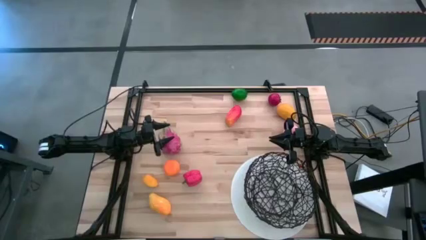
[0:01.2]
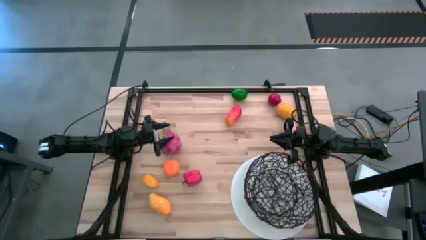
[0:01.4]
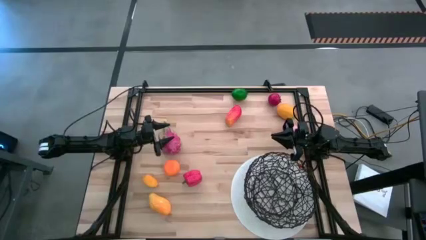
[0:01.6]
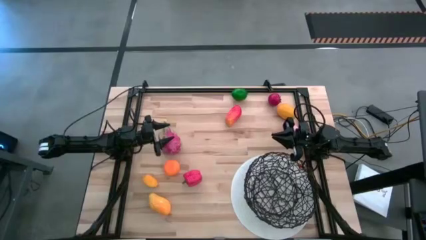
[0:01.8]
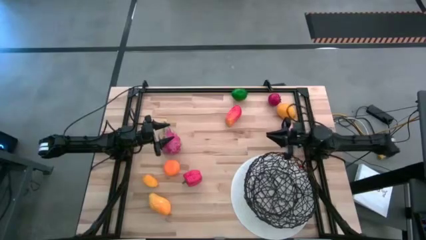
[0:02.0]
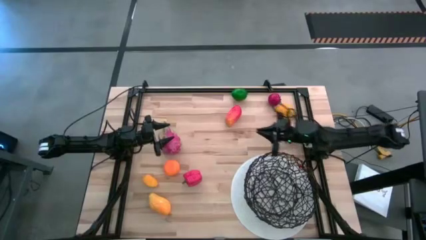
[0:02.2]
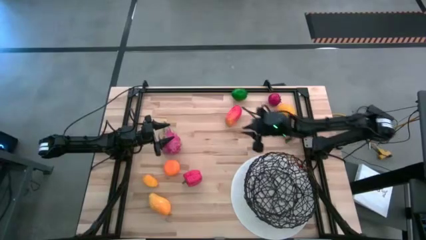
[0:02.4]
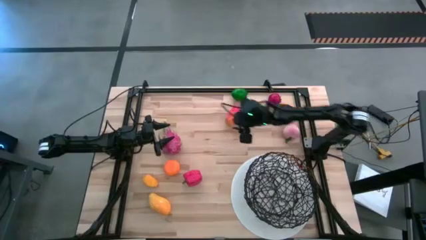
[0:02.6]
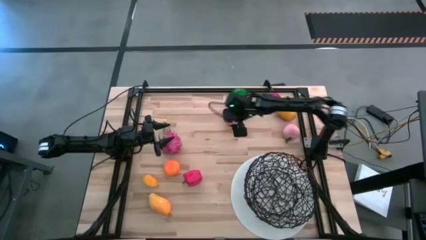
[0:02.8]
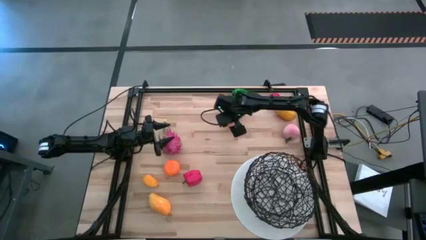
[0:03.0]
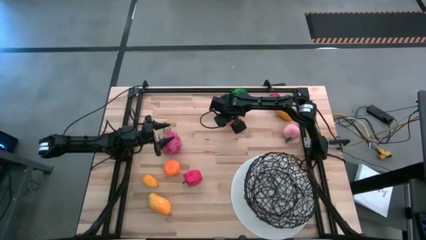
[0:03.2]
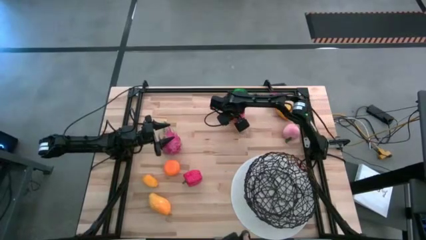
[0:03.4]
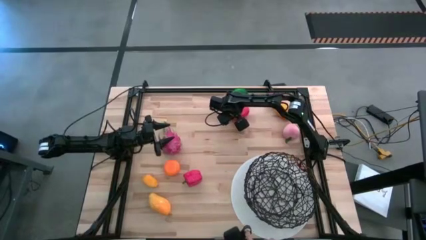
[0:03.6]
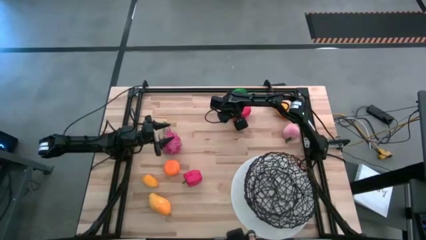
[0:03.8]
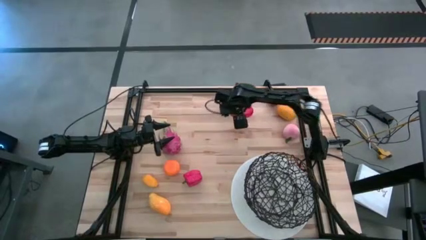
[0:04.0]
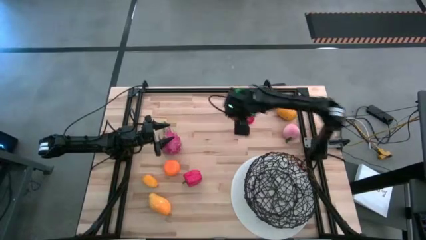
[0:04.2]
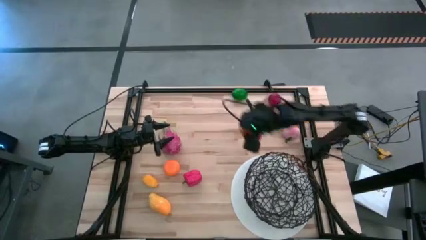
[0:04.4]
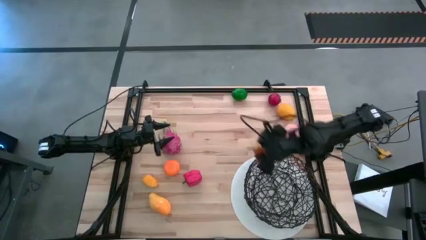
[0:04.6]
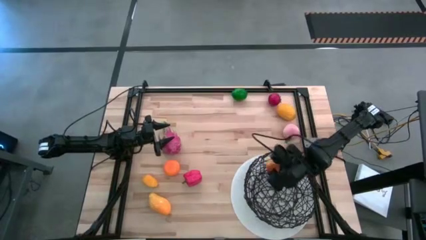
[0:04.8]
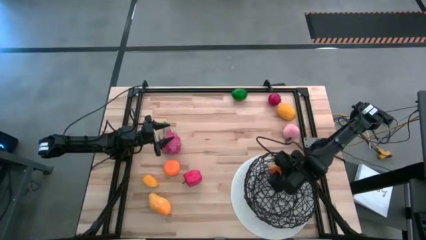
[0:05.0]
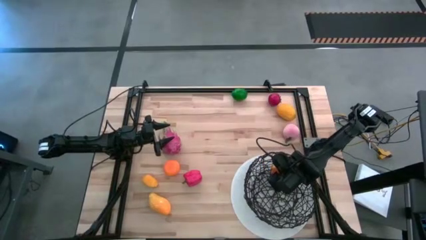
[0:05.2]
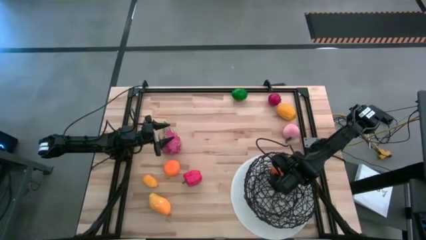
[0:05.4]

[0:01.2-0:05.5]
Task: Build produce basket
Put the red mango into the black wire basket

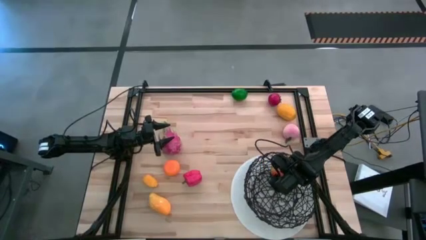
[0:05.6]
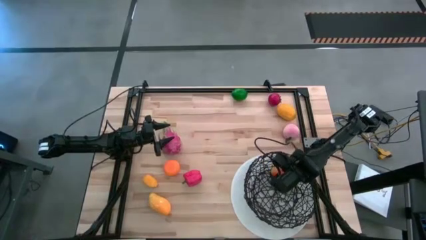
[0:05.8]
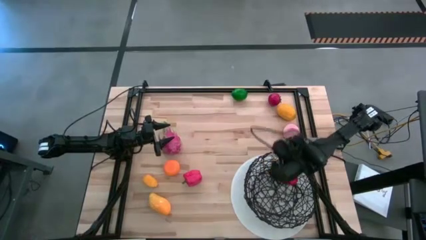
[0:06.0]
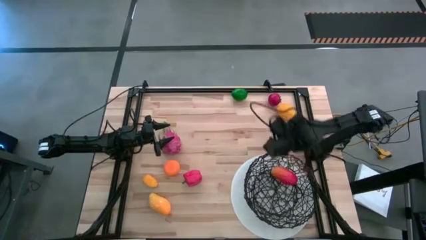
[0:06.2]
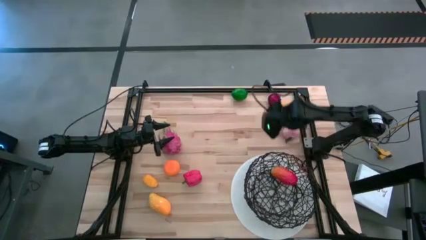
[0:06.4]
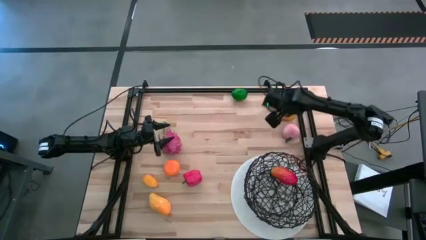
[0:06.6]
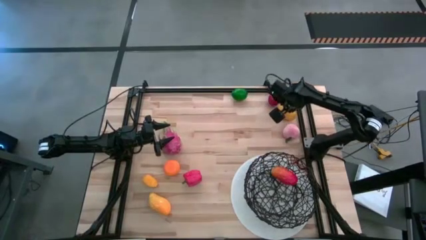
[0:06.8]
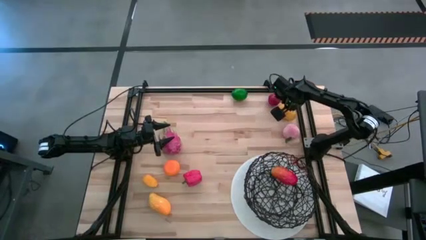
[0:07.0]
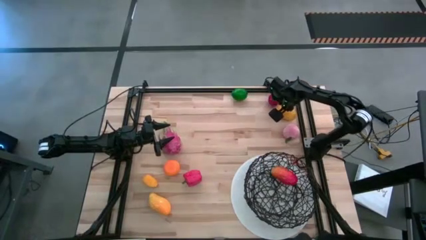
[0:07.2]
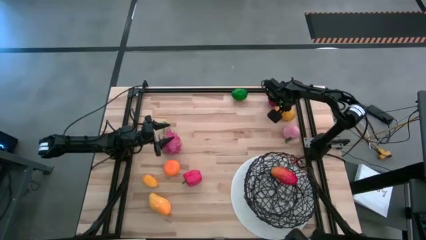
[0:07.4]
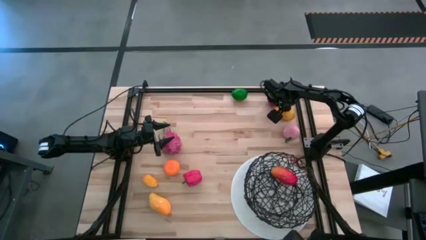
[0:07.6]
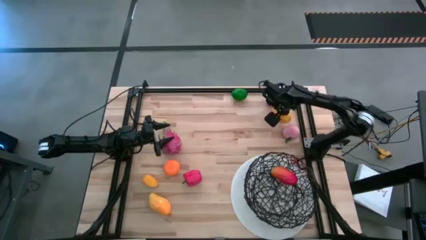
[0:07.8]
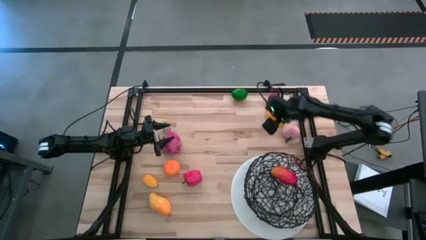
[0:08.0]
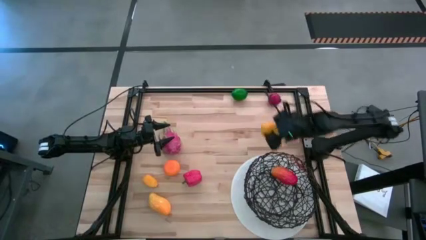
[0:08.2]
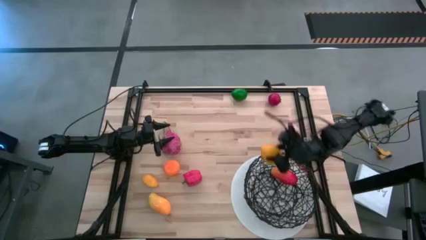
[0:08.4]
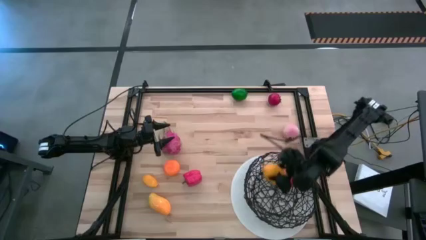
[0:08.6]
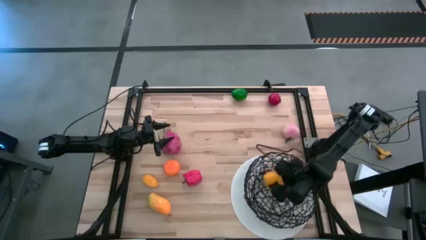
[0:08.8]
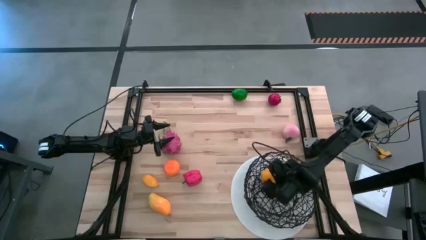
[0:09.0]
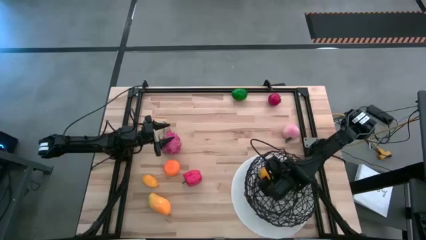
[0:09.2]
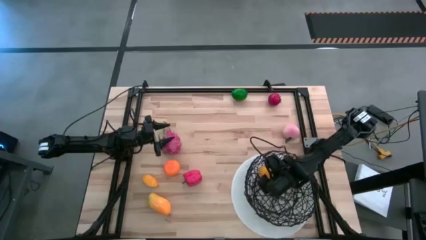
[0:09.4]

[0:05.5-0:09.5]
Put the yellow lemon into the black wire basket

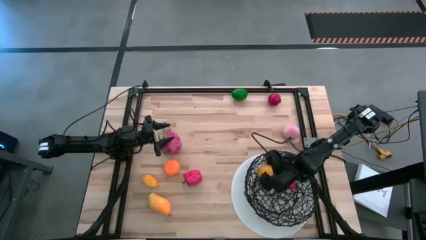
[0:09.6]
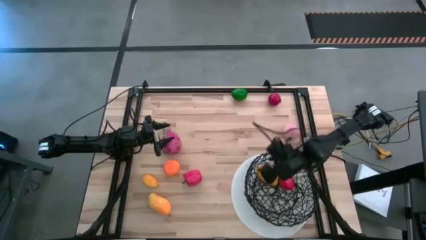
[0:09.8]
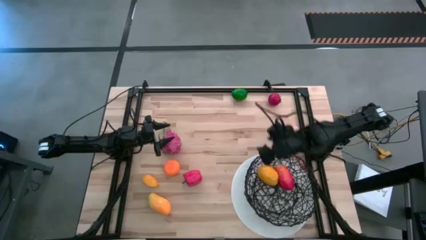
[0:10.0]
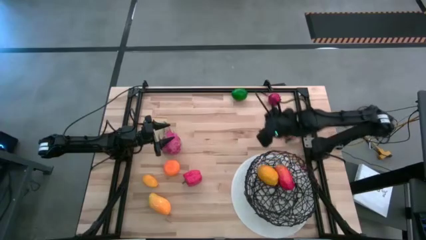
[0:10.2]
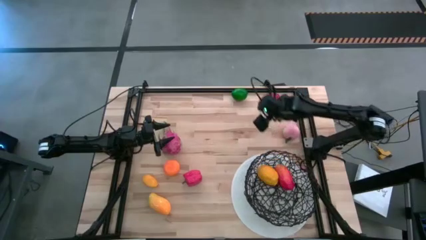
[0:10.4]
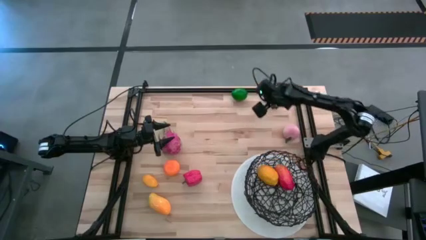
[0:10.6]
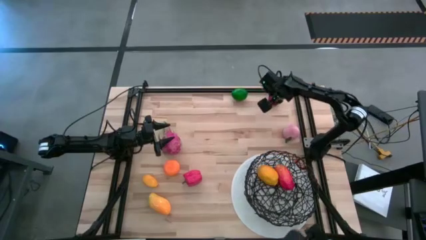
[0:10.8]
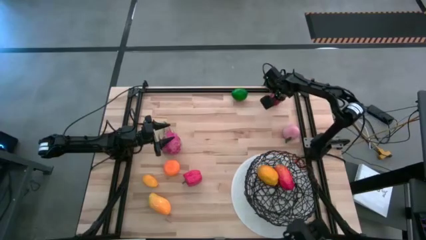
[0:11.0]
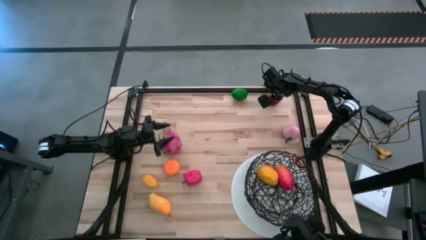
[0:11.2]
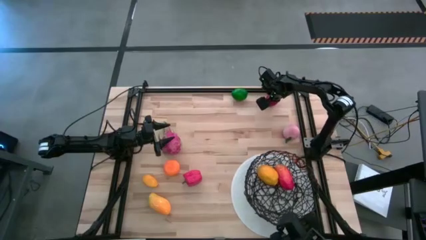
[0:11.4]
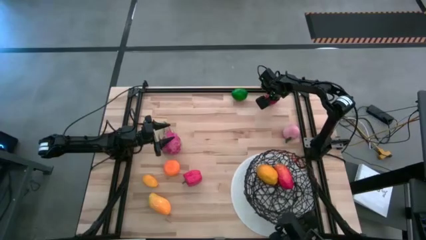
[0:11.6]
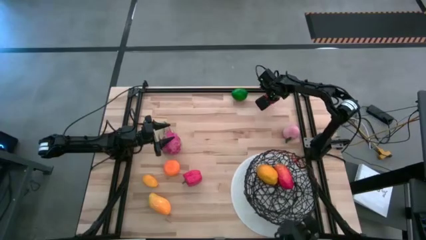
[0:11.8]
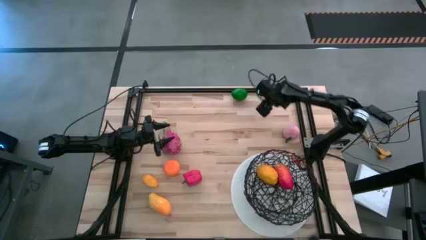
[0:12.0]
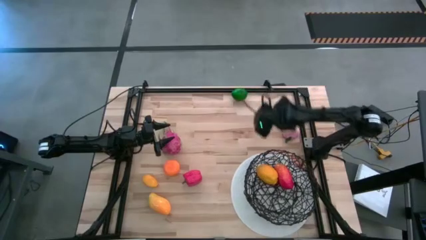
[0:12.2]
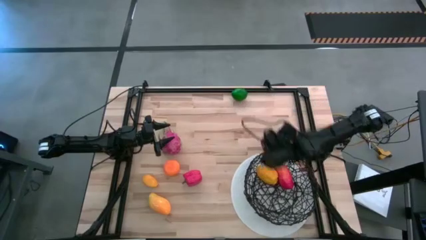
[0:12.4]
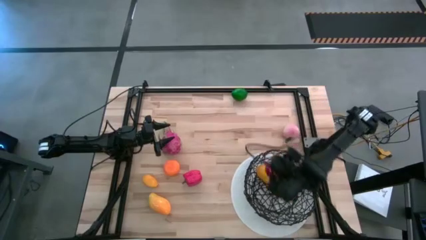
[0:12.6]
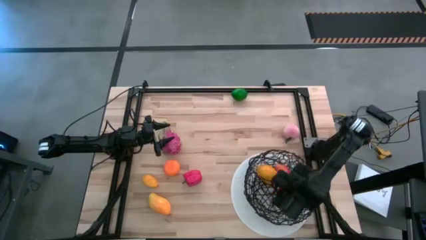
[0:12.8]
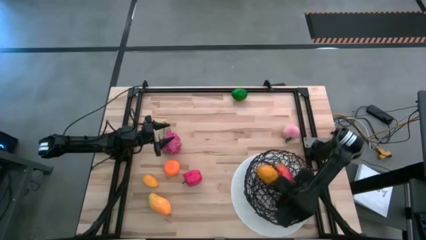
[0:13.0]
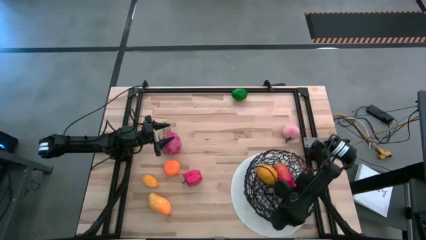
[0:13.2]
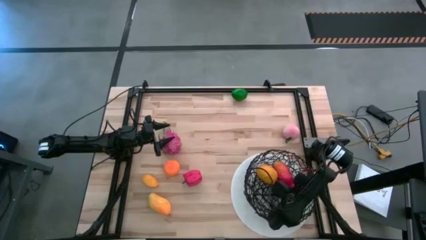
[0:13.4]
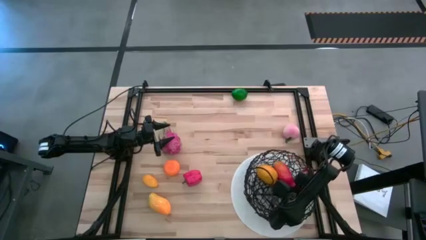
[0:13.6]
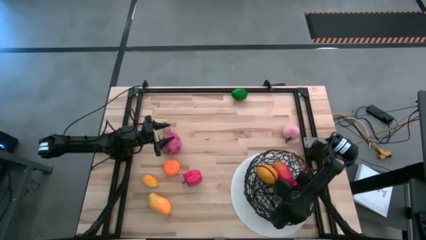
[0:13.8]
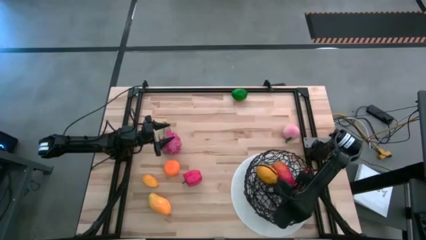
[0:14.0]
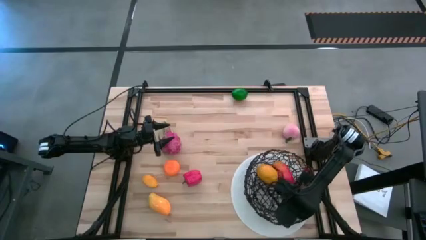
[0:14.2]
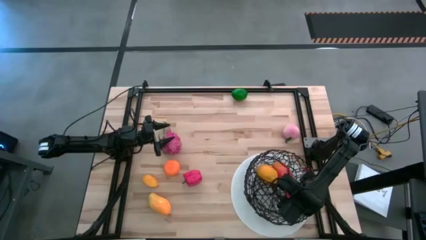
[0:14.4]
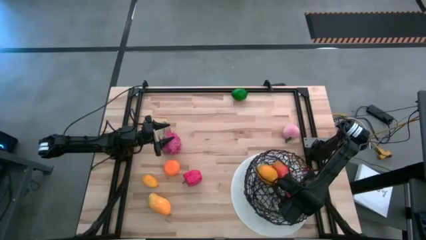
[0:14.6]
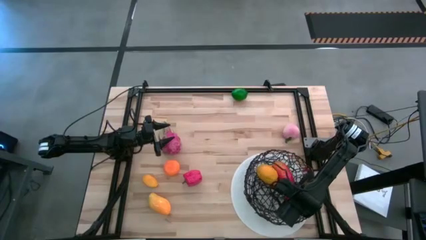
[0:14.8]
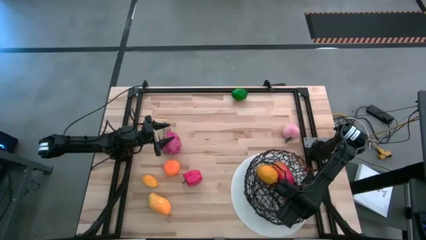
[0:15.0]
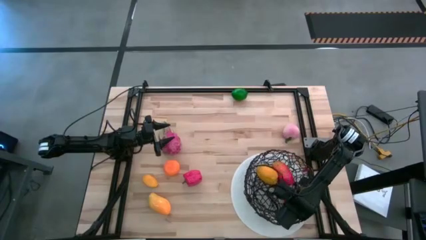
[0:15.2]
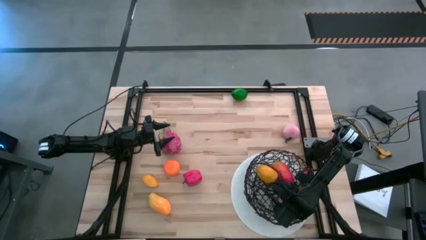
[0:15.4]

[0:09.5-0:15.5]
Put the red tomato into the black wire basket

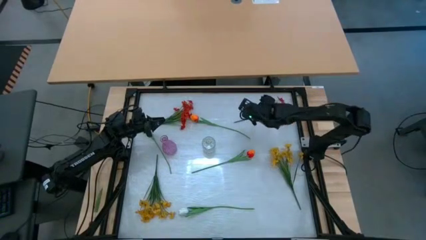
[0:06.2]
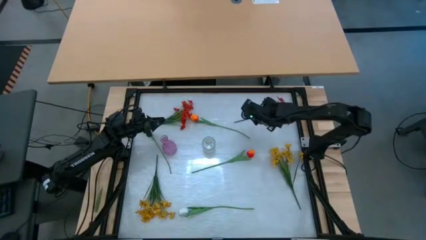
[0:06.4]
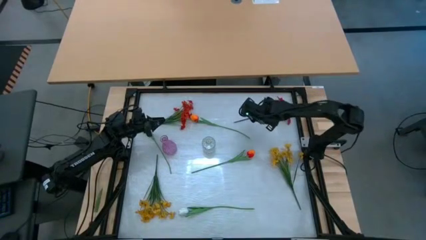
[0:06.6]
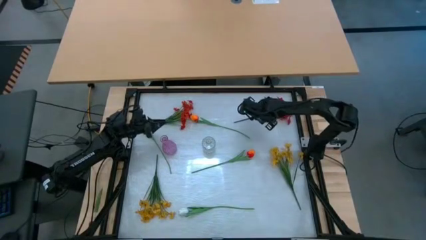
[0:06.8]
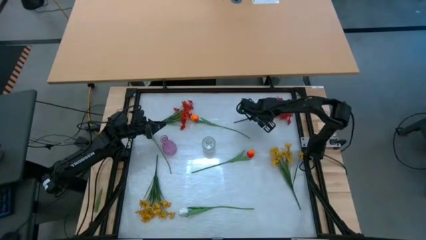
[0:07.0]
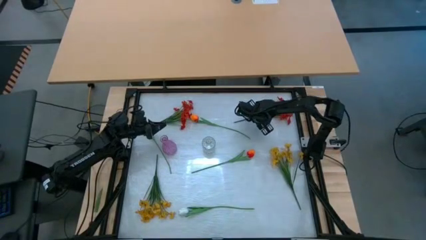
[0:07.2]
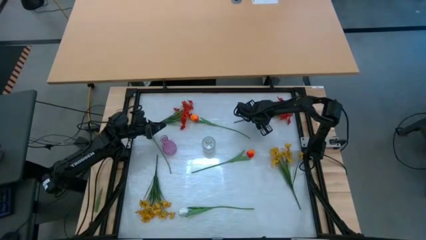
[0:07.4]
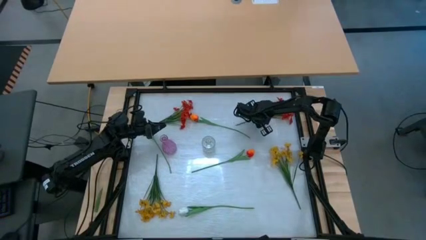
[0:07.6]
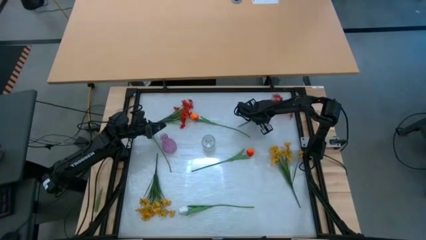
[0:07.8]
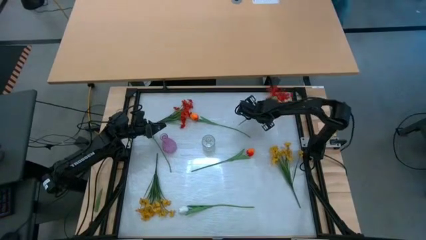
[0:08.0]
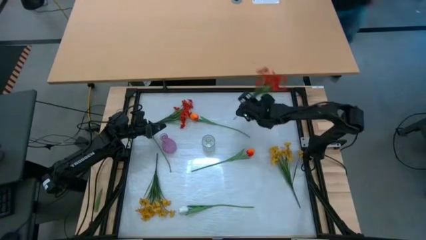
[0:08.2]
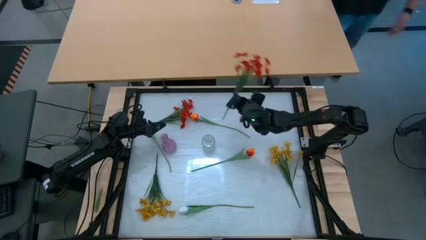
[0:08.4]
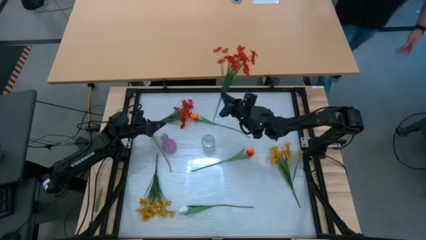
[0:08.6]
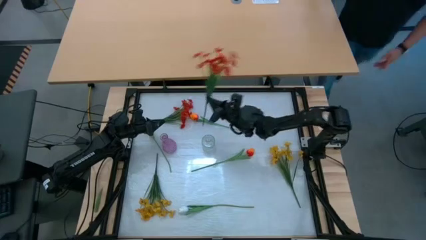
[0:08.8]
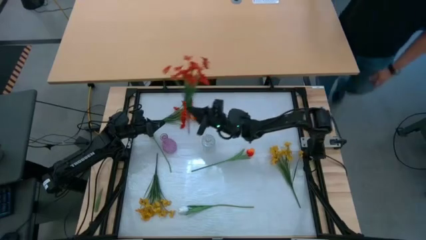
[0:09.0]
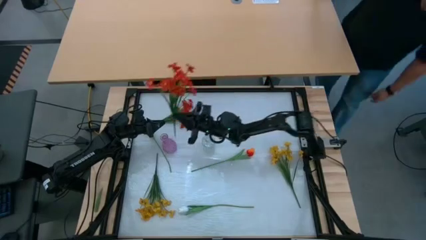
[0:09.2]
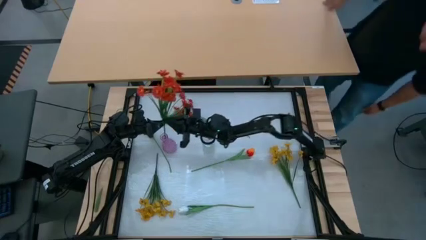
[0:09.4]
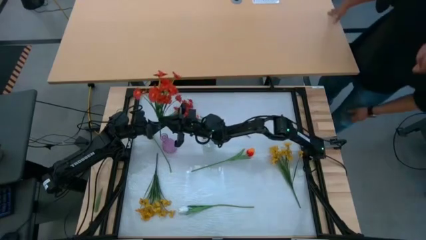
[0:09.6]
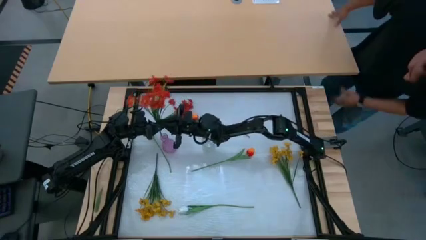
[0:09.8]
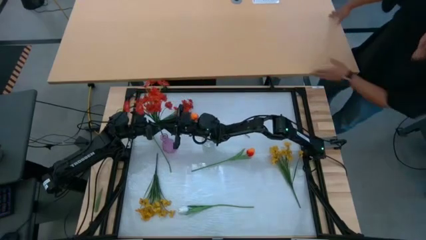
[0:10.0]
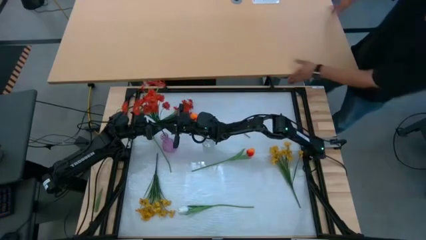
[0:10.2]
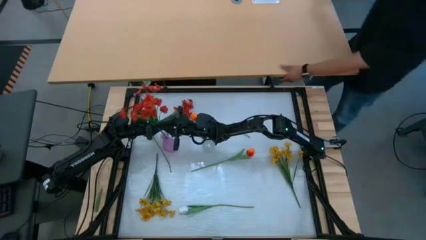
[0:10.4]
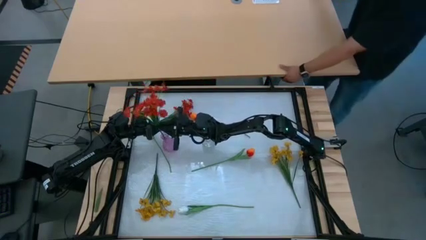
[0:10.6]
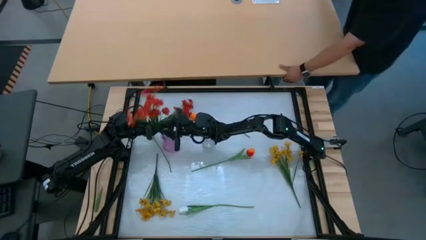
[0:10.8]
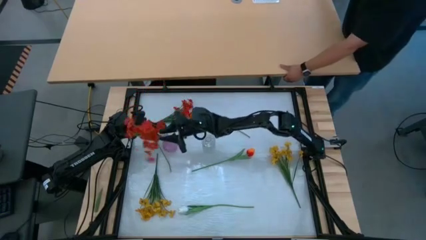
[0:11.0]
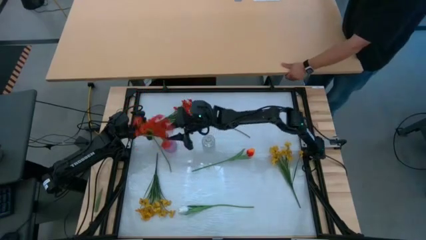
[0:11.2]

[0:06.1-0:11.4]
Task: Sort flowers into vase by color
Put the right red flowers into the violet vase
